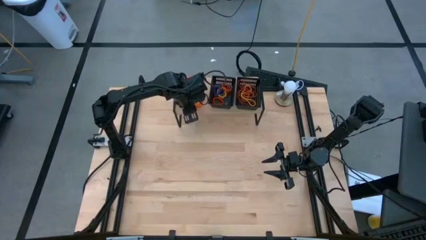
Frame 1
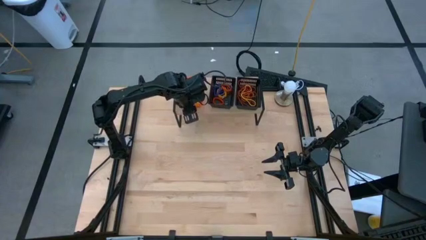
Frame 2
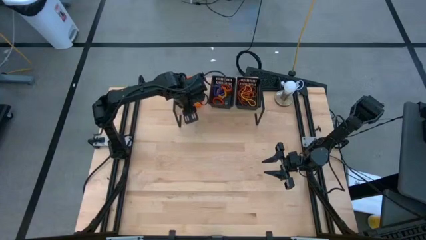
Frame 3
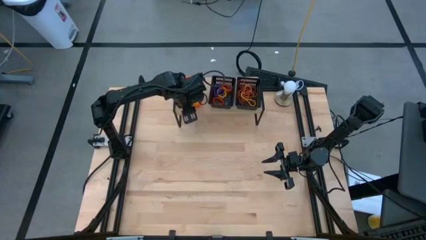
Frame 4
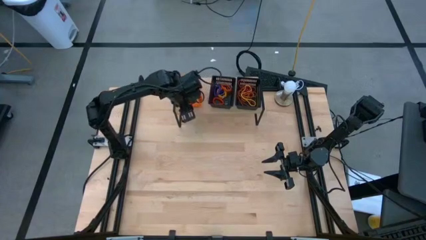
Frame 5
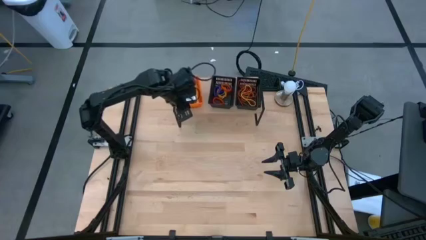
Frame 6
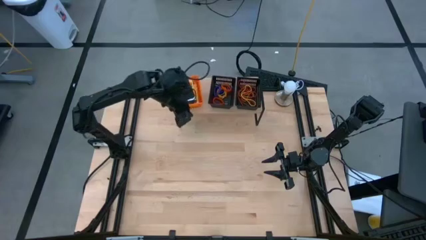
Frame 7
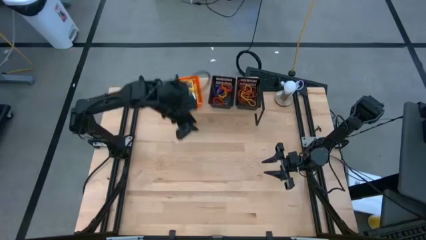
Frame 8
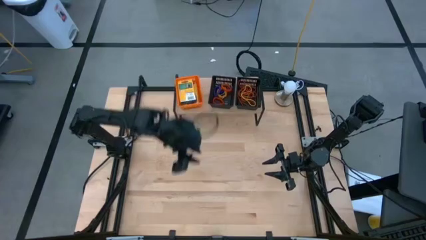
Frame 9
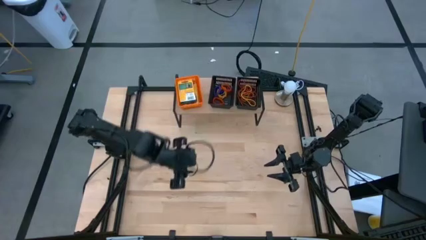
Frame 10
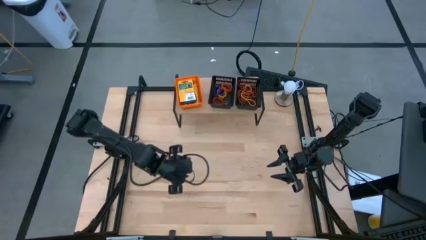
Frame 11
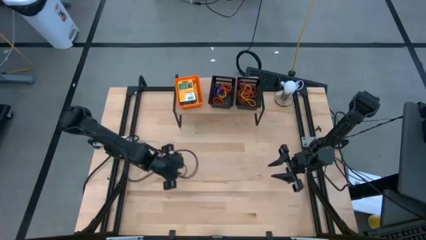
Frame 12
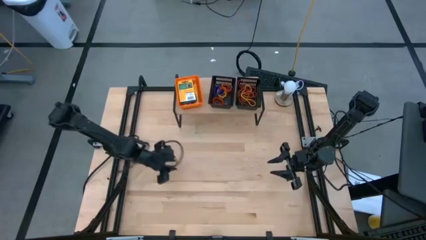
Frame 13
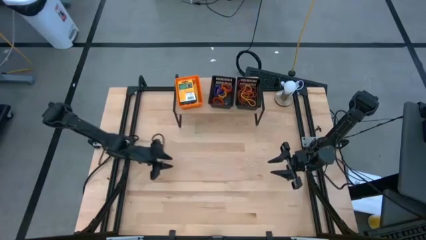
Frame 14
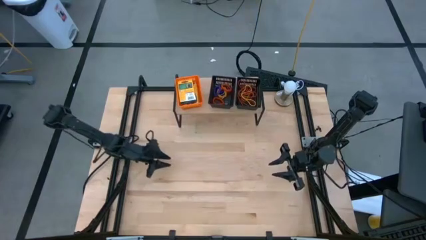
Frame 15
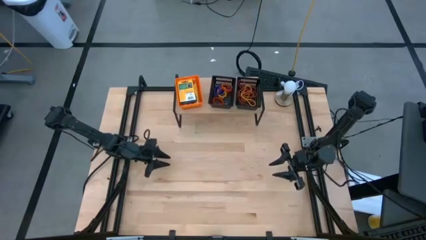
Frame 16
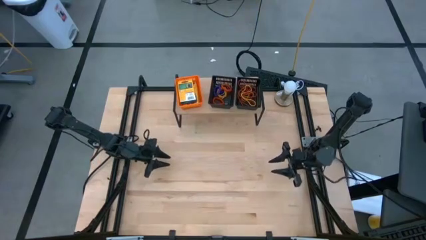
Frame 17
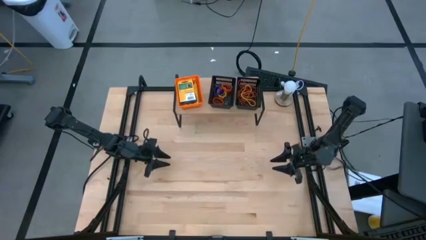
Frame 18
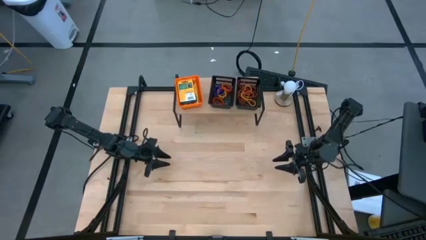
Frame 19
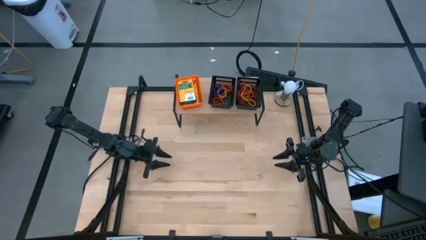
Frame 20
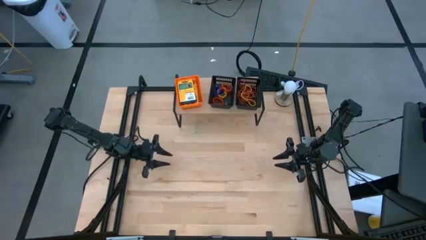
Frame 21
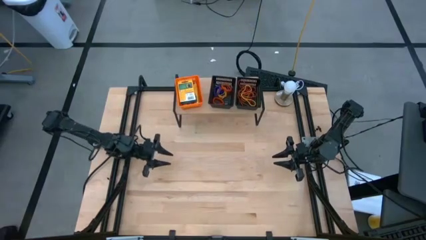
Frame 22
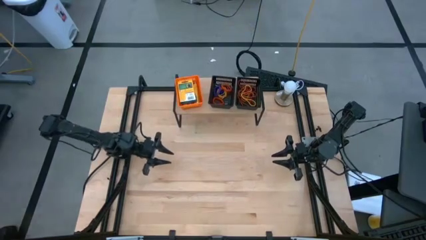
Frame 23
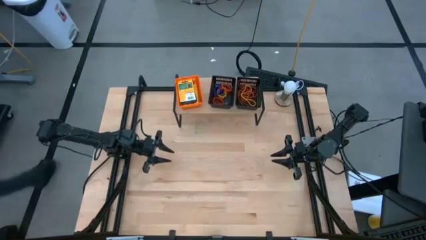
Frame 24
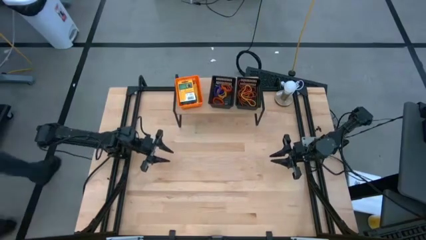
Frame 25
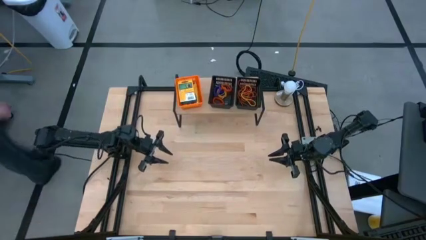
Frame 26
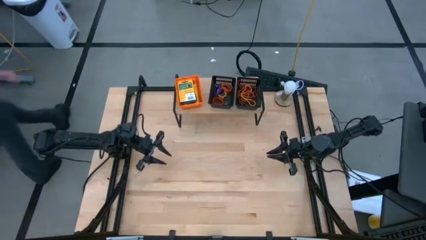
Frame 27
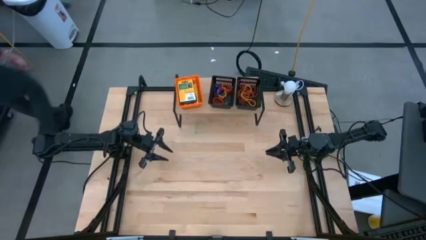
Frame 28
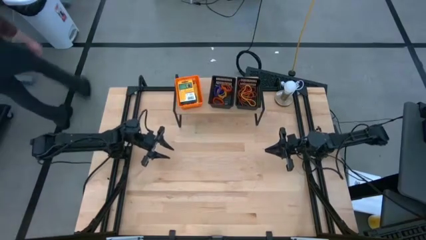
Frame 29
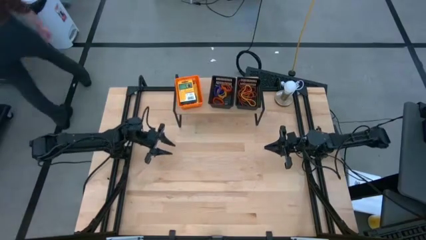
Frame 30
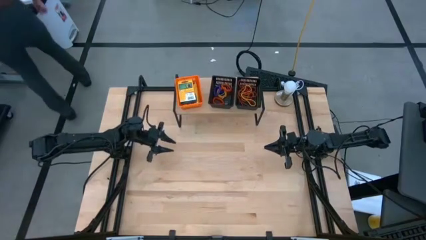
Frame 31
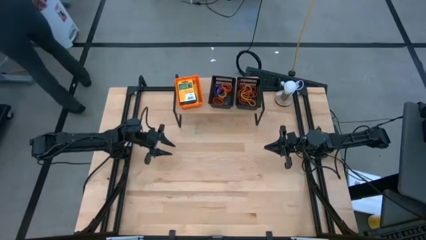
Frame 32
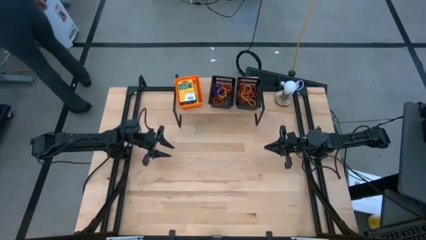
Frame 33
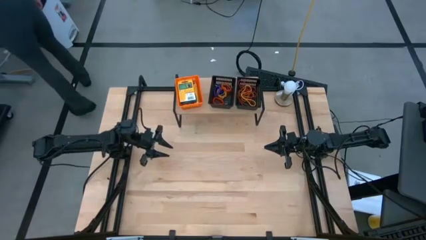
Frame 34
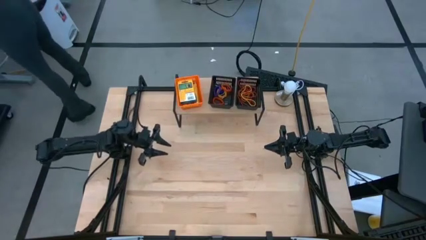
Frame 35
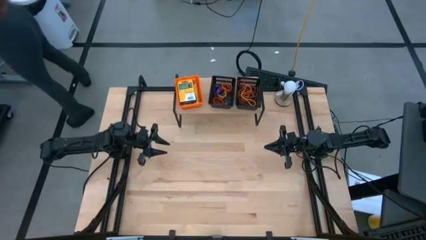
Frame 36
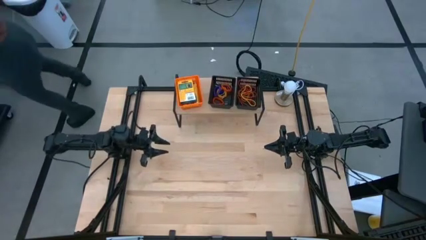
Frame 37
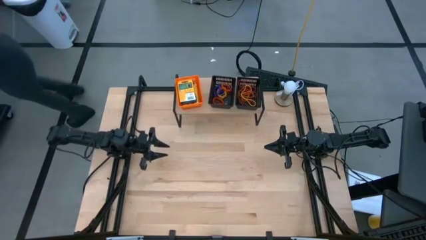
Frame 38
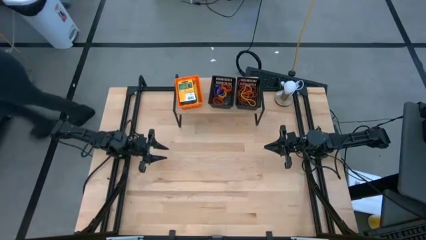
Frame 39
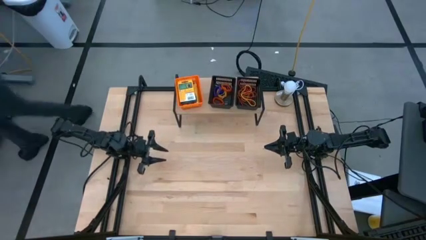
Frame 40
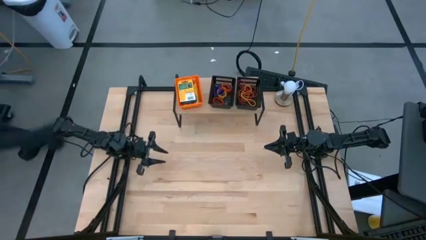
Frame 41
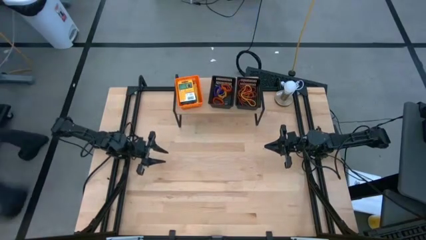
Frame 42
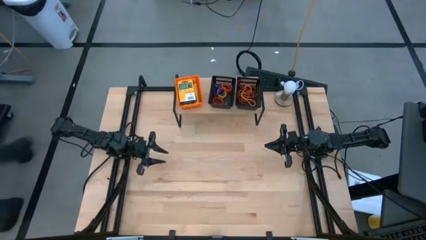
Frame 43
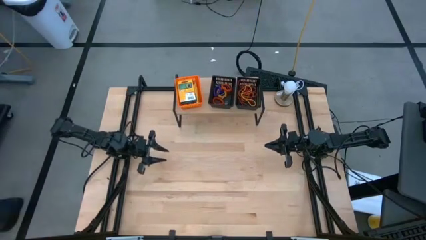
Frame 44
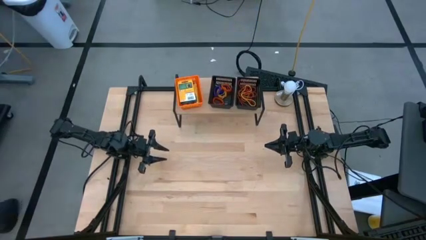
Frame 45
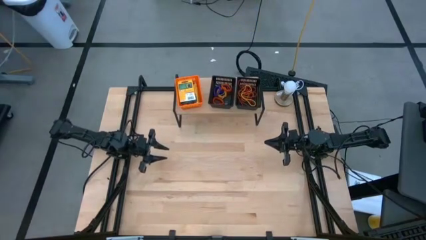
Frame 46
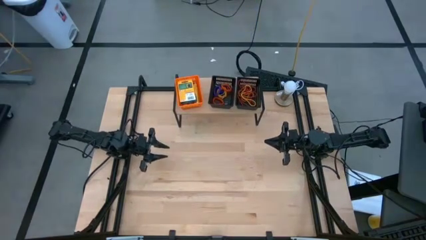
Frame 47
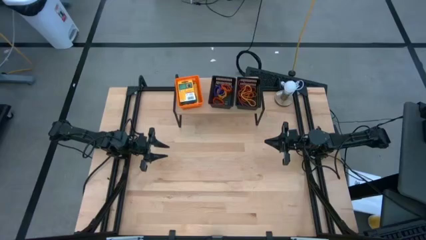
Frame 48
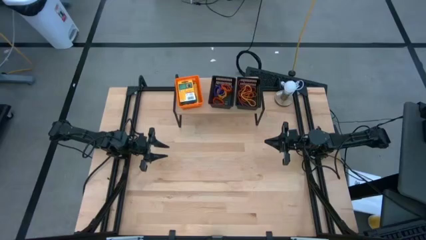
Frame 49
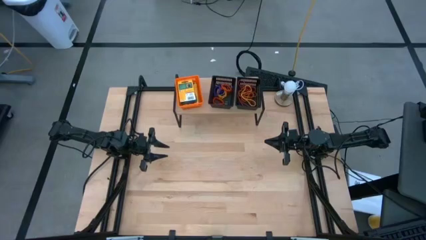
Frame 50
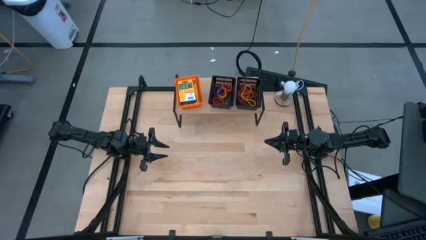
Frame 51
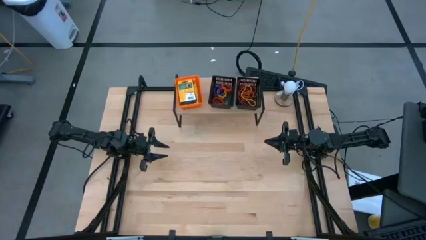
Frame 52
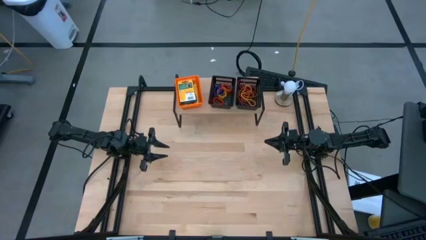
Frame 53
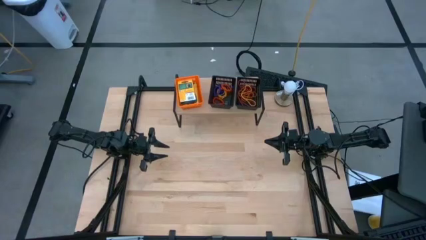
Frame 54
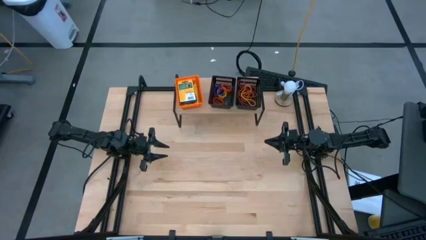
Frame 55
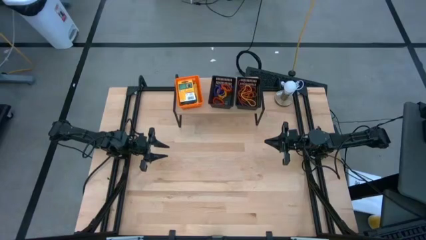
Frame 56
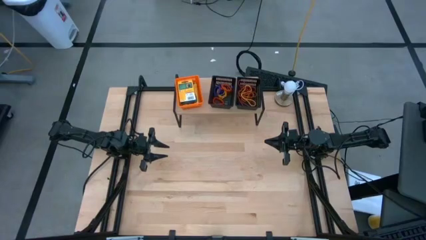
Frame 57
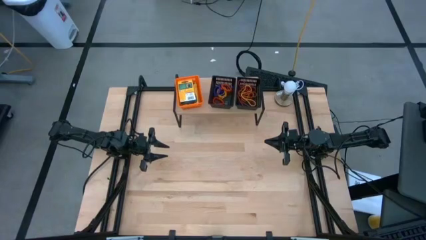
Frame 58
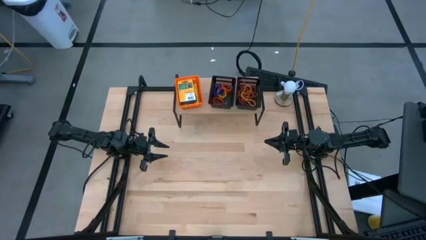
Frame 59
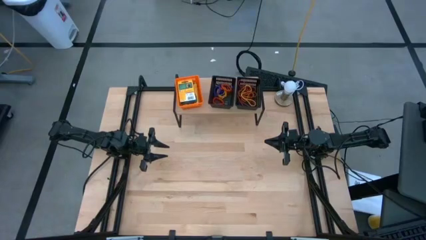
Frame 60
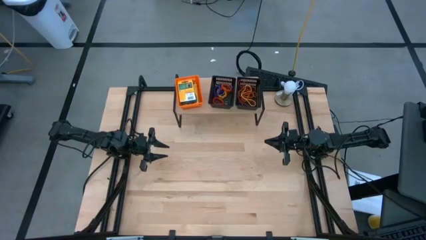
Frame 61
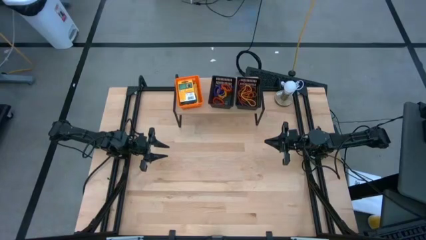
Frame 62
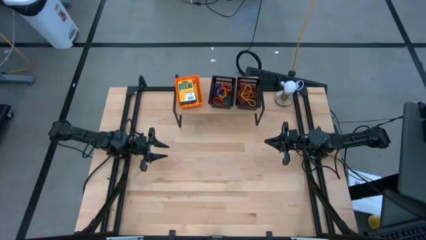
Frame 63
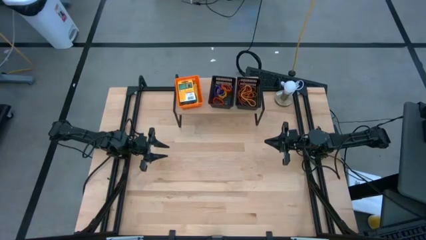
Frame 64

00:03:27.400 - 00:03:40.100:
Task: Pick & Place Office Desk Supplies
Return to Home Position
